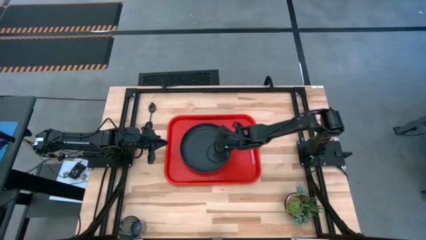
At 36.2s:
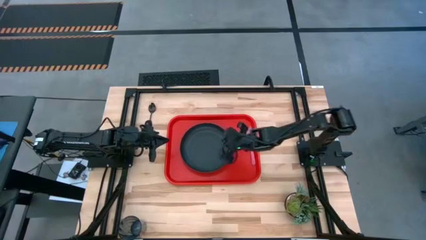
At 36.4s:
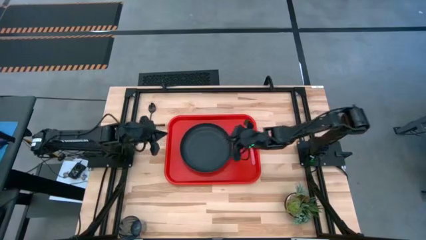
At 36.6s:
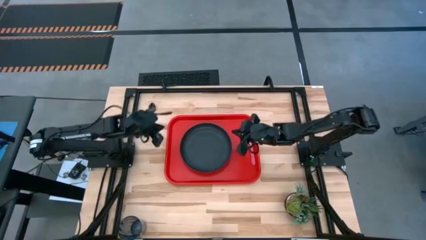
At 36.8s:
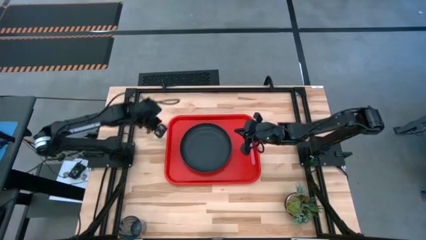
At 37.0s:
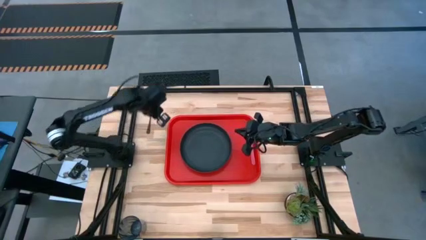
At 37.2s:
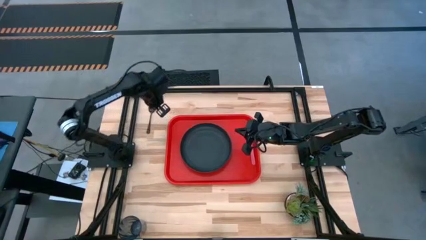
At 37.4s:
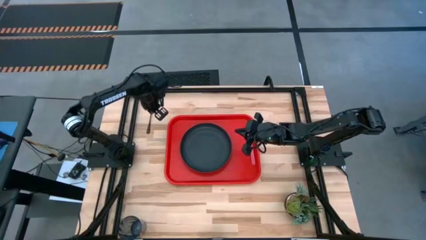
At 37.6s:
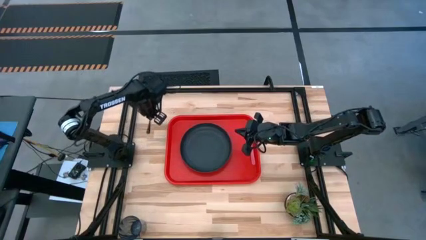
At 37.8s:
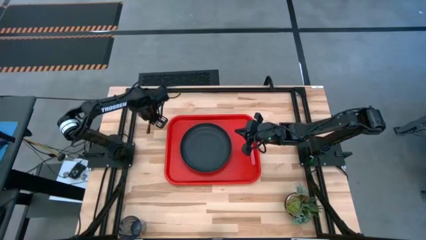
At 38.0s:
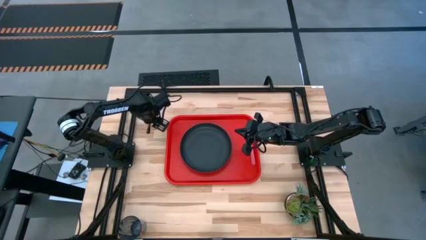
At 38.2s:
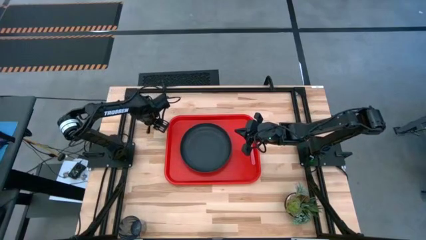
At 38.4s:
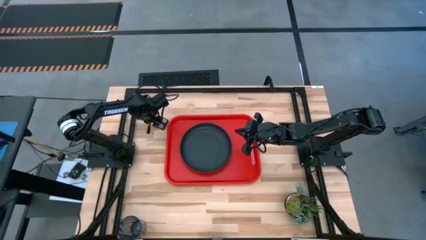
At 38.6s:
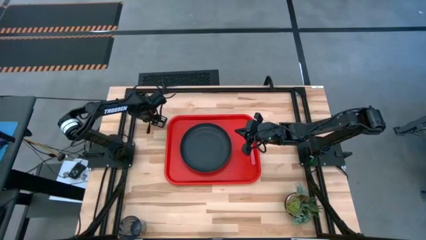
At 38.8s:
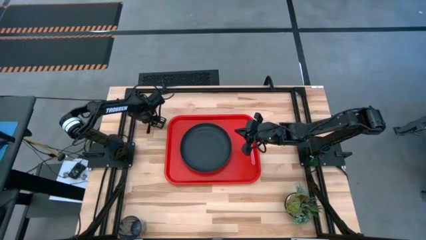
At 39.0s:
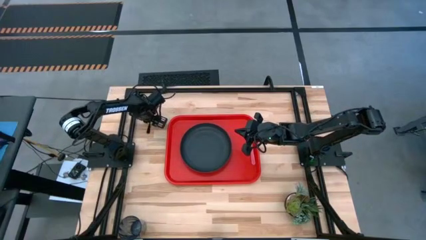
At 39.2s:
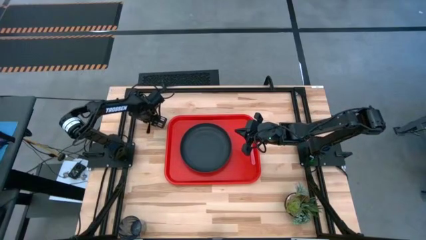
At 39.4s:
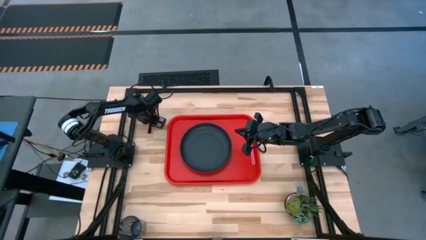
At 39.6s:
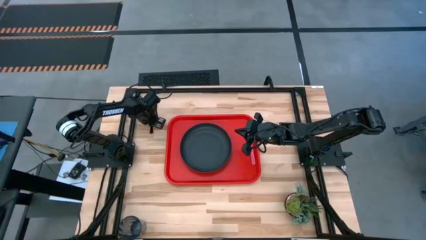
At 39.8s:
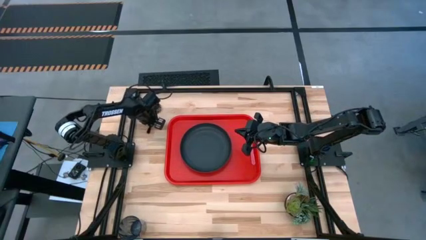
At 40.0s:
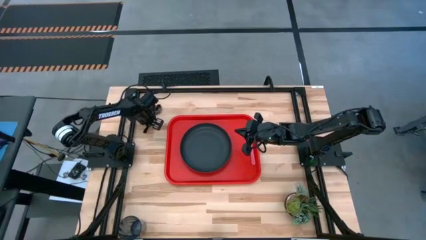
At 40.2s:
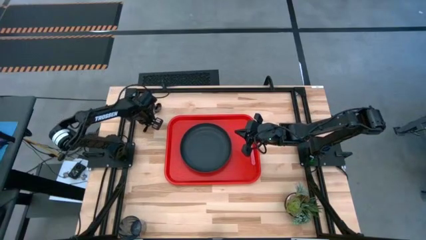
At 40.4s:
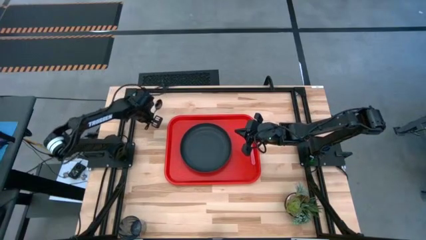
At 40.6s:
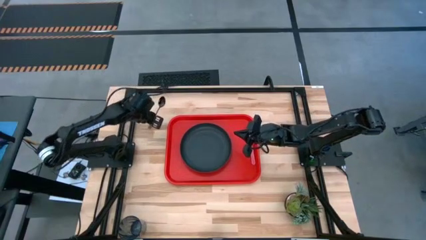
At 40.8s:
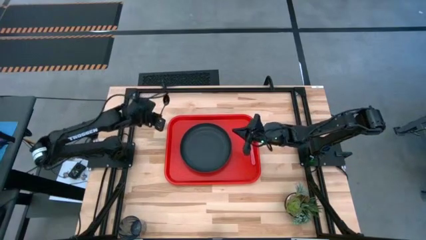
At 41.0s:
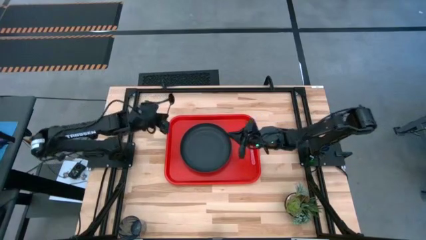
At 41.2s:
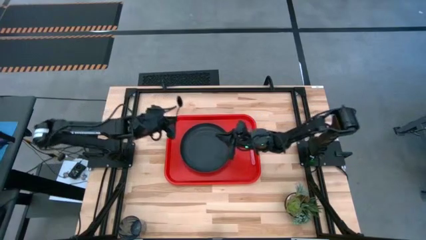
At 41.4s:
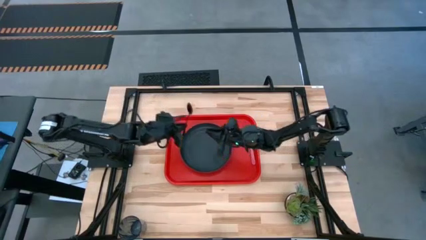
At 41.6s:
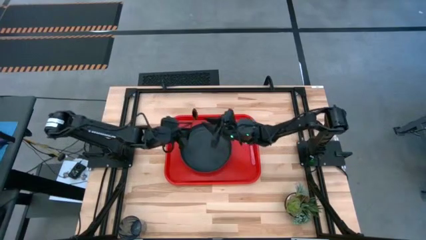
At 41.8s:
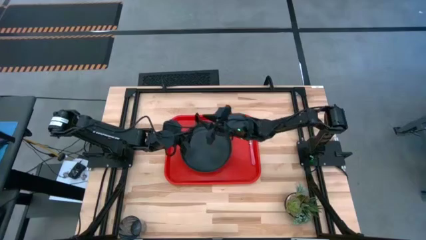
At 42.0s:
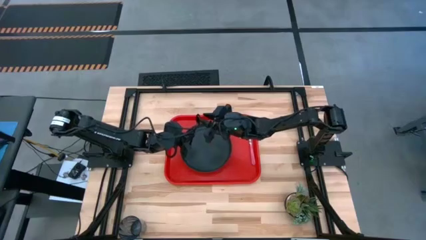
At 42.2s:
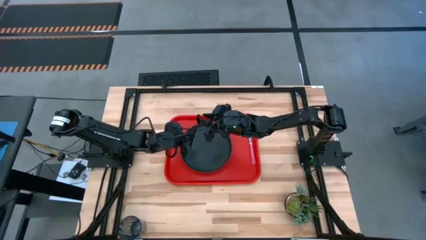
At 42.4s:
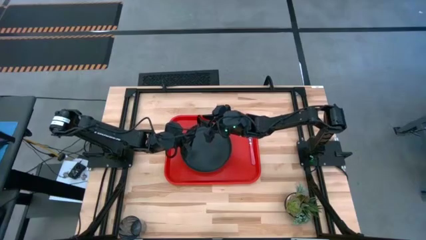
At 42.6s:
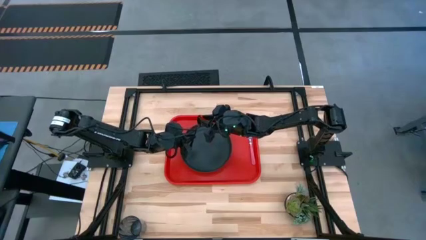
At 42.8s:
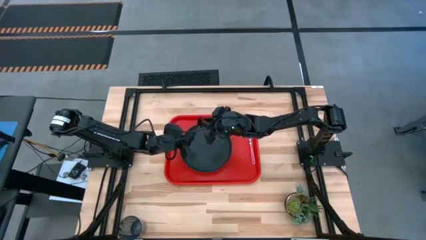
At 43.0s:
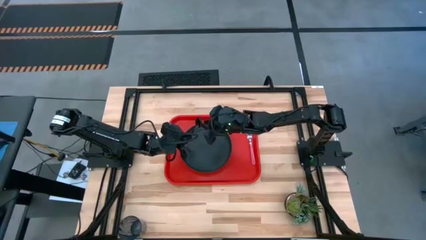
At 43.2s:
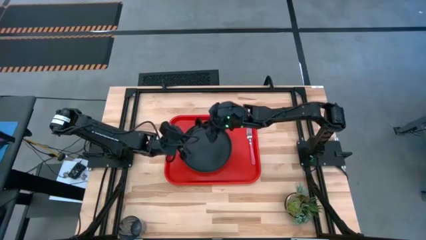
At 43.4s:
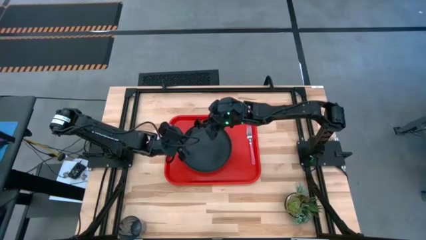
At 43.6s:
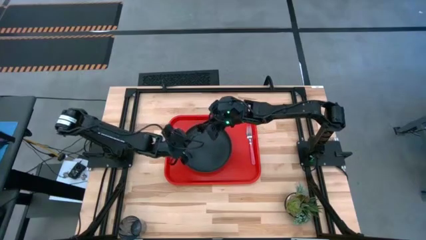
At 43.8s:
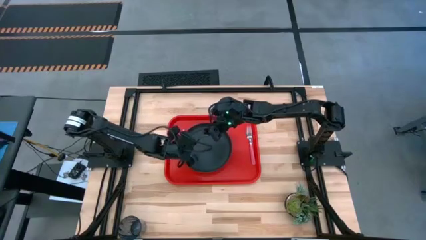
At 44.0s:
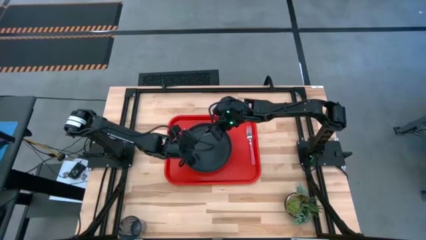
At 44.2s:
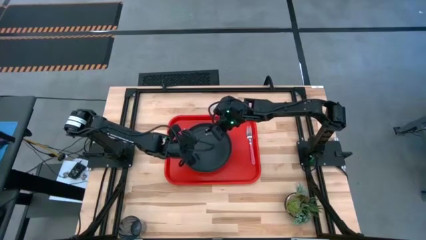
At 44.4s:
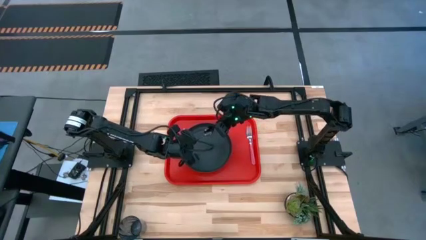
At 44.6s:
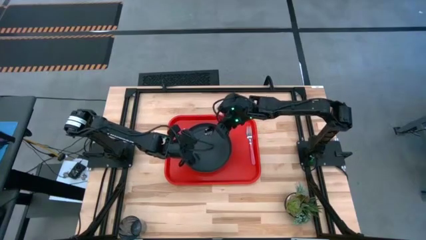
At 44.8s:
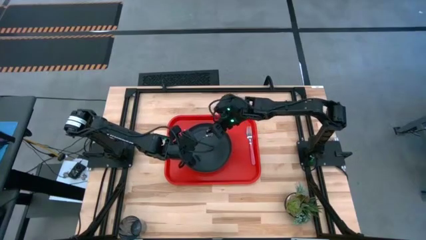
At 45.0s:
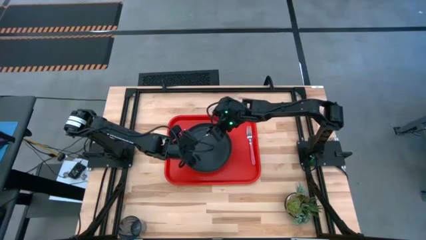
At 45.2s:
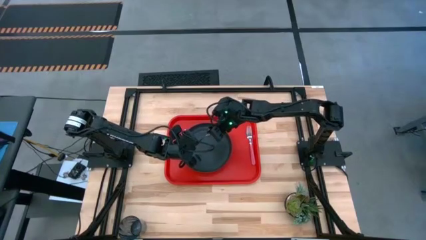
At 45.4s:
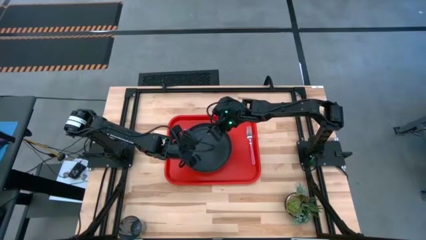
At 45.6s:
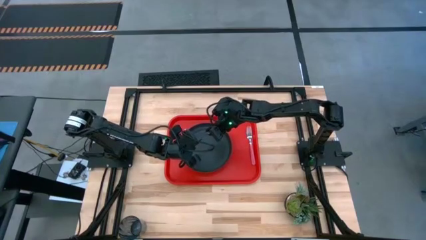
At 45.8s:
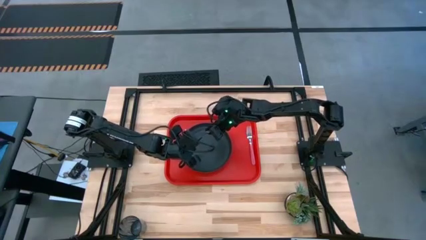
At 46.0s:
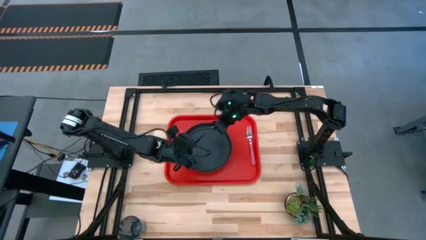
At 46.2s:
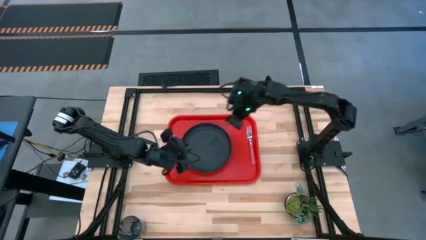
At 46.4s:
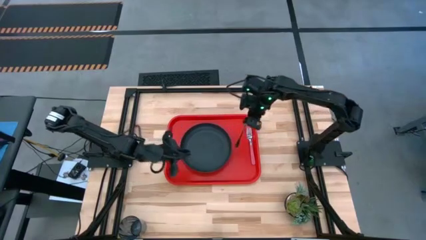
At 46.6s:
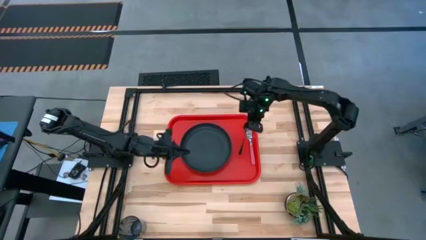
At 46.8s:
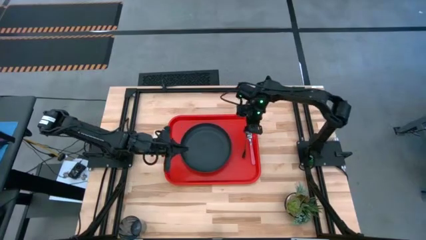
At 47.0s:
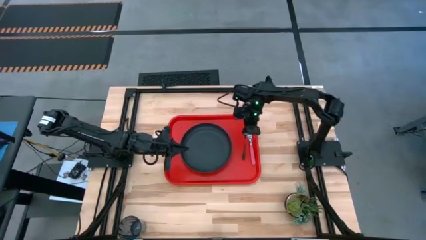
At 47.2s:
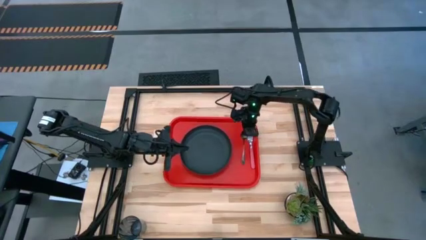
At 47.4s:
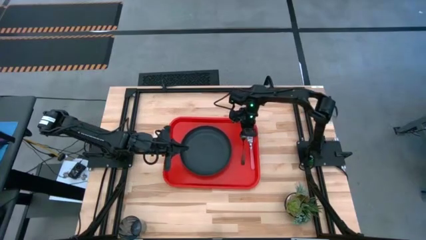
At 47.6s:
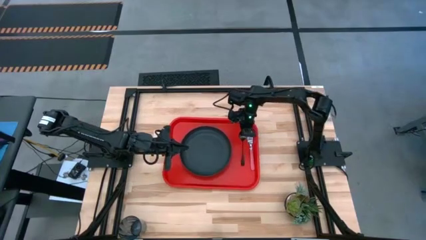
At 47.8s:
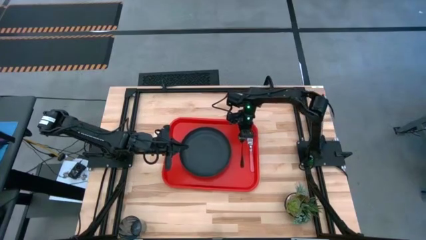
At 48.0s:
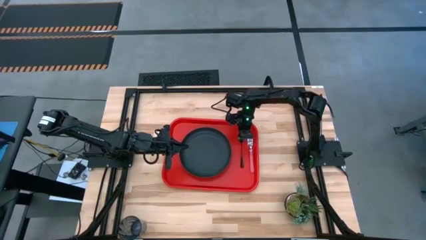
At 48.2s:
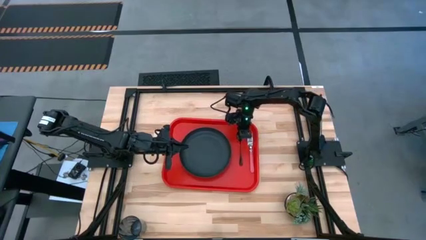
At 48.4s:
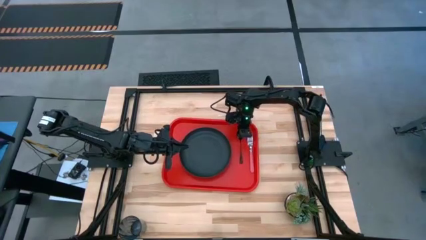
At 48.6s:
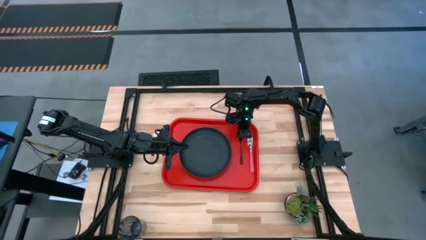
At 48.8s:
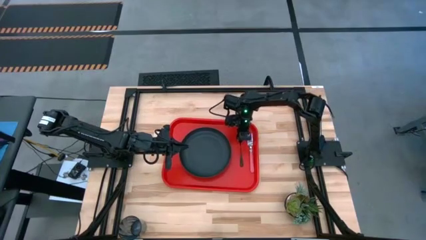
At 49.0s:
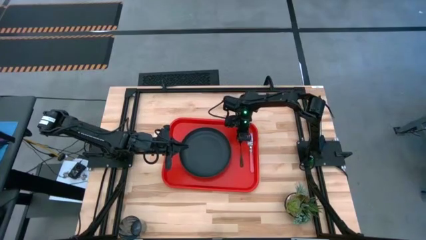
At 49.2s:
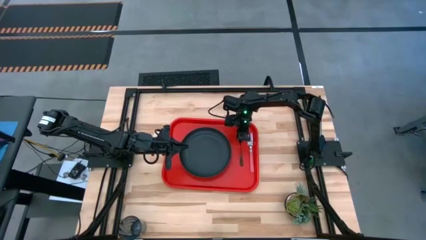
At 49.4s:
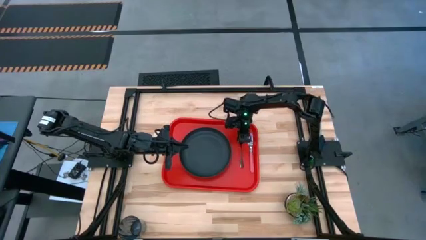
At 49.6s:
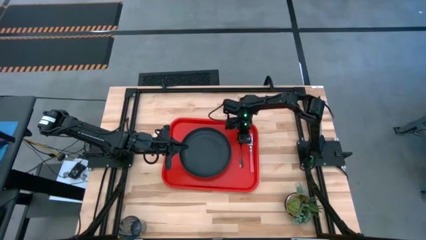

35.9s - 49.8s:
Task: Pick and place plate/cup/fork/spoon on tray
Put the black spoon on the red tray to the left of the pink fork

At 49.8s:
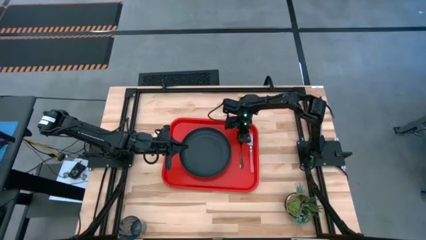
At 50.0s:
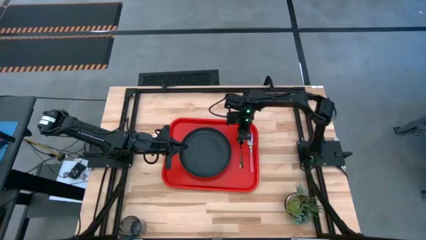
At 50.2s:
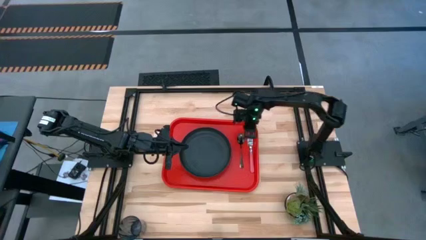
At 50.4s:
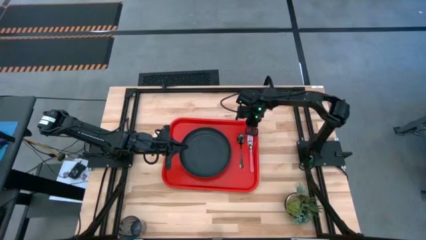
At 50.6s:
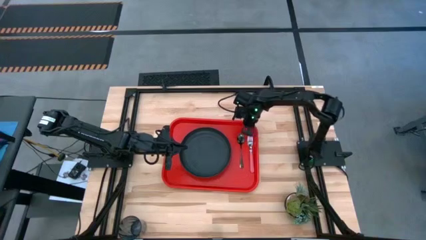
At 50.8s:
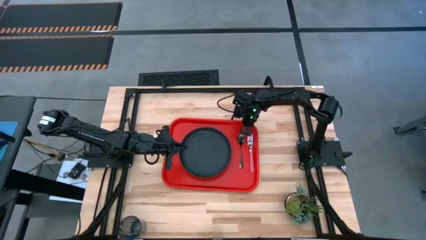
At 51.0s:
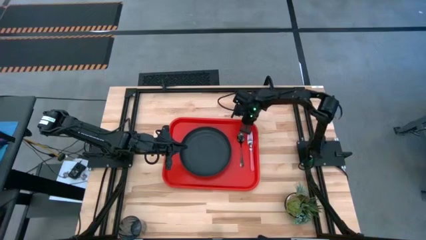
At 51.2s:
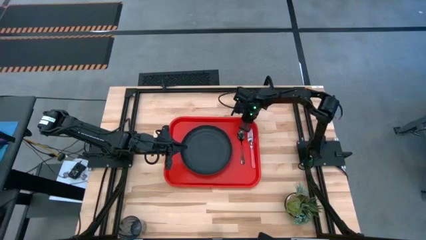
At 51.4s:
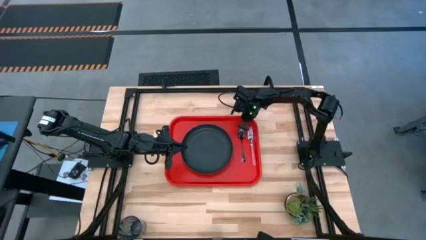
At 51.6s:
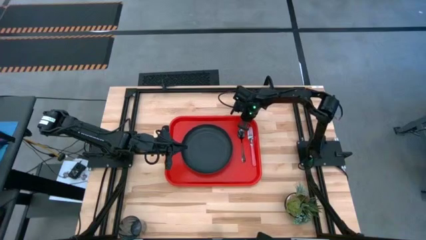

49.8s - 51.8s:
Adjust the red tray on the table
